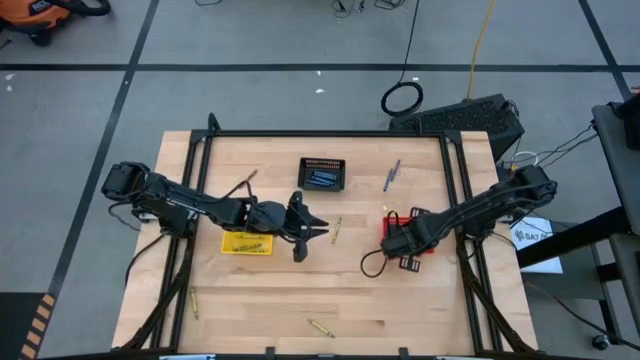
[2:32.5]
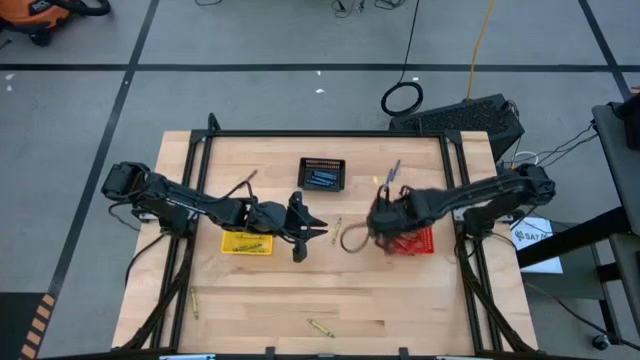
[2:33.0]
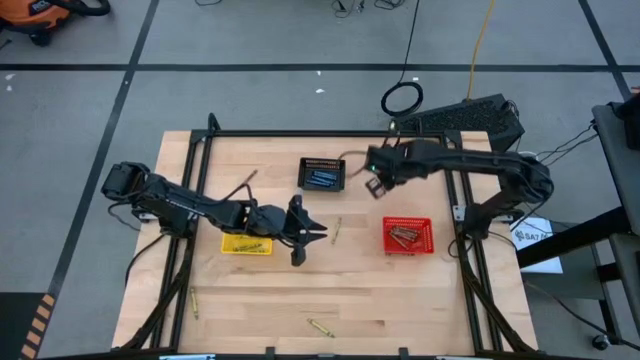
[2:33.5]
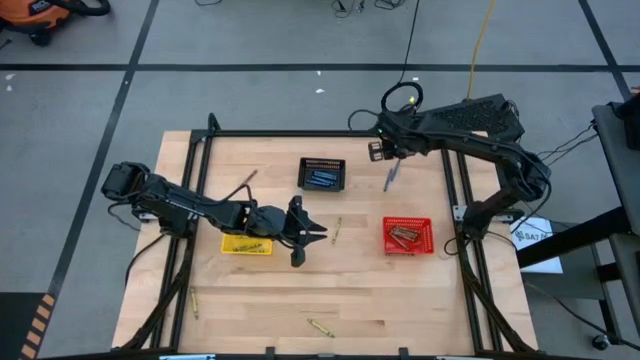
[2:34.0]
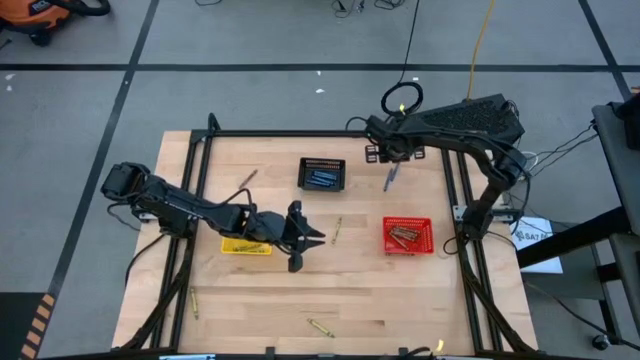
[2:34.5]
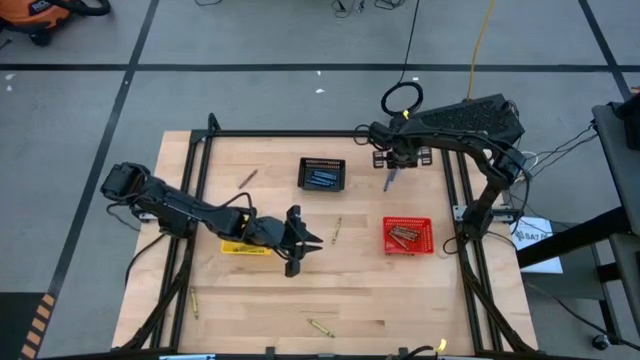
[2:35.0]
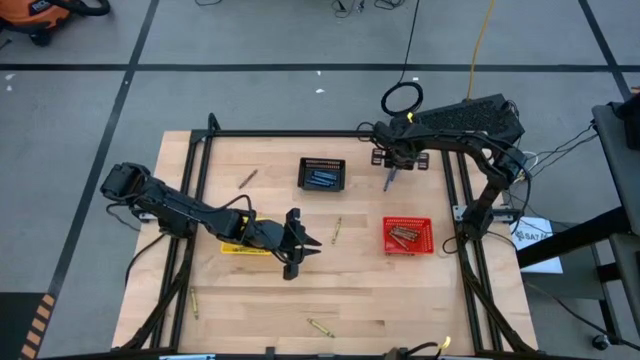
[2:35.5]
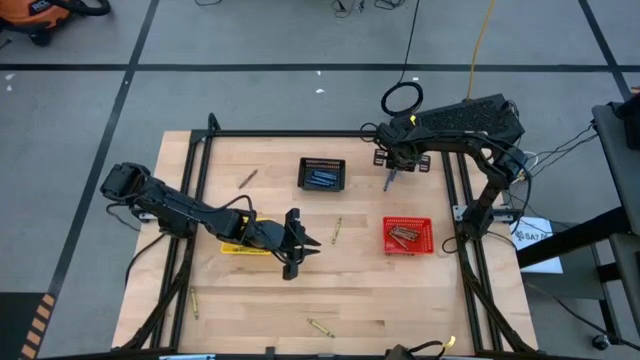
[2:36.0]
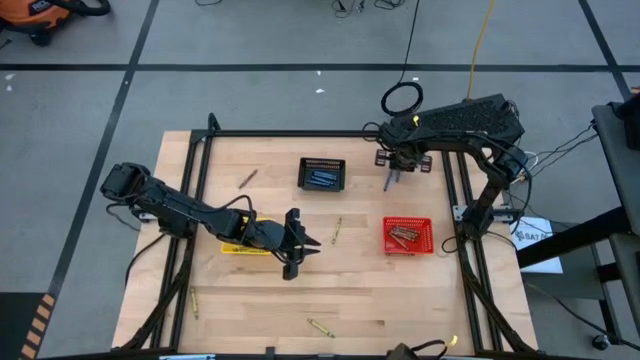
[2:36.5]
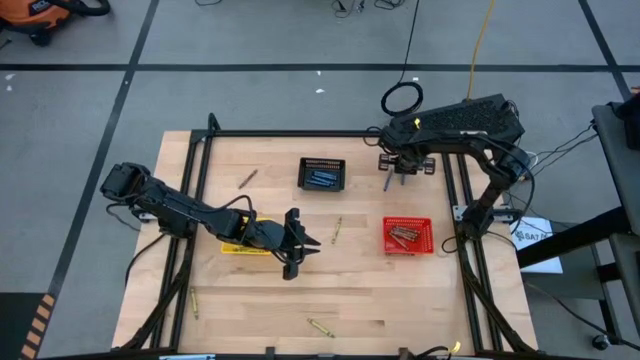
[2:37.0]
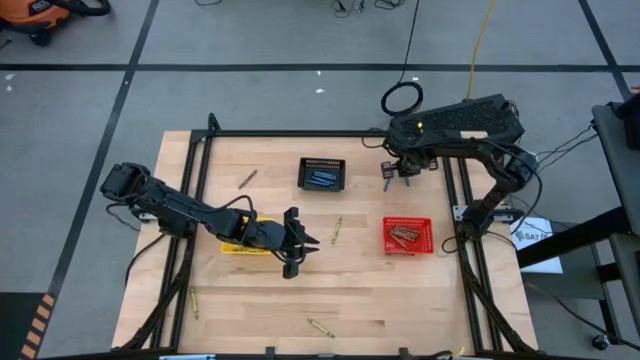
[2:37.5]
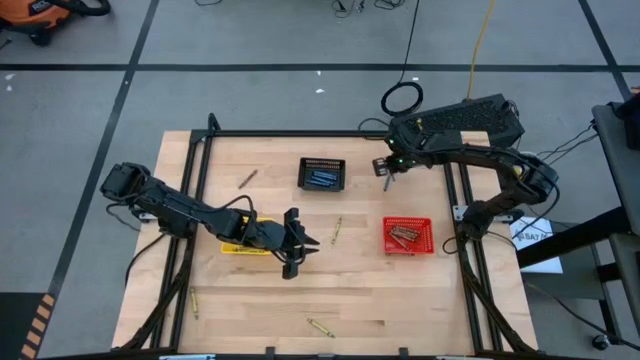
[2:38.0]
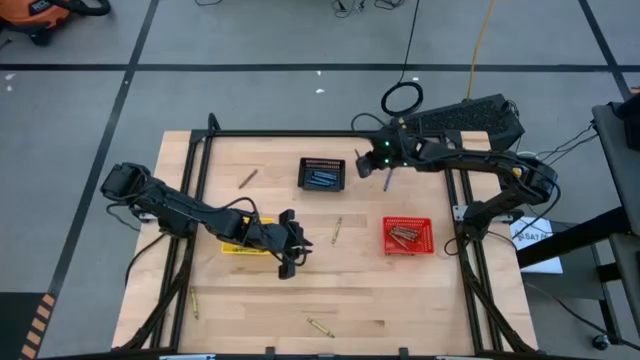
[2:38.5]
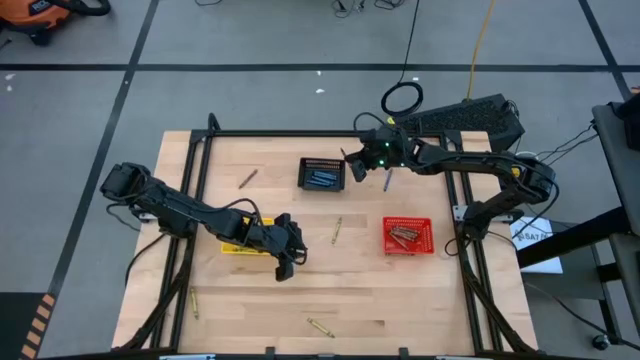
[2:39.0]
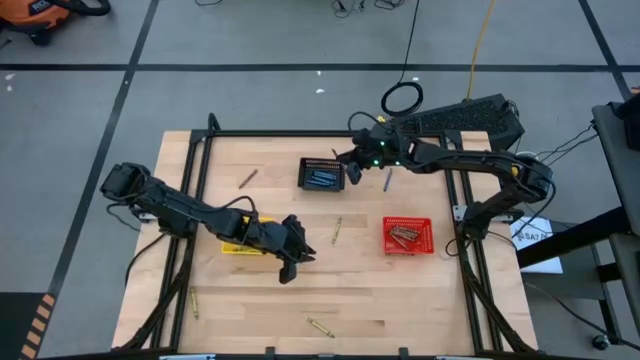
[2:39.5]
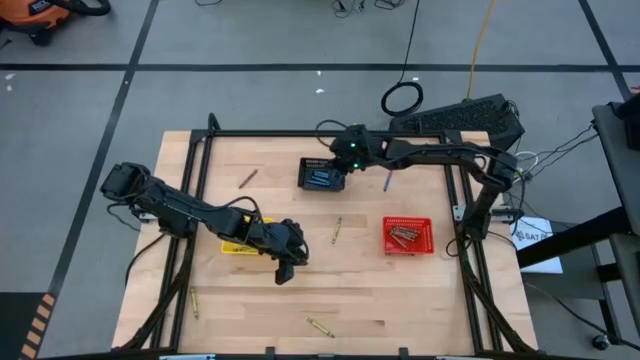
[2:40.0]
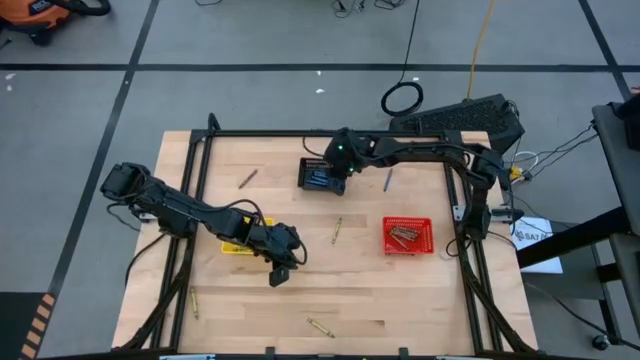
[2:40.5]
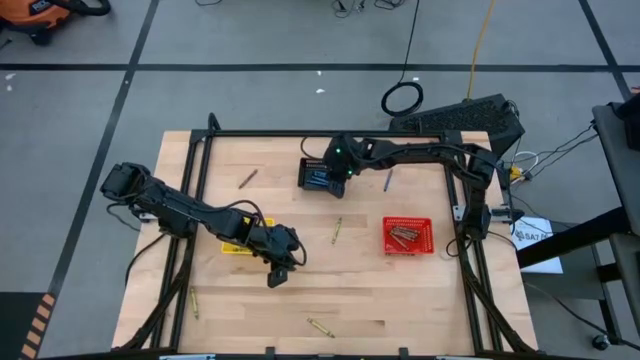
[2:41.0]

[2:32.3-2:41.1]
Task: Sort crayons
Put the blue crayon into the black bin

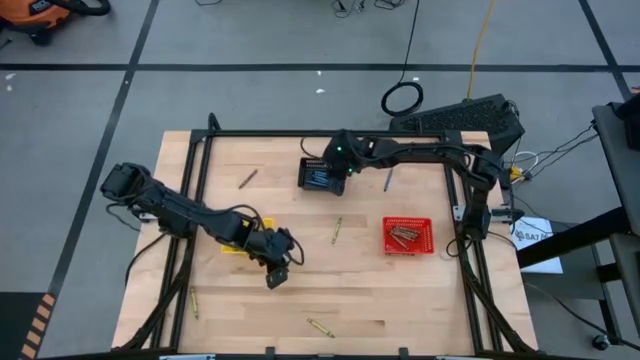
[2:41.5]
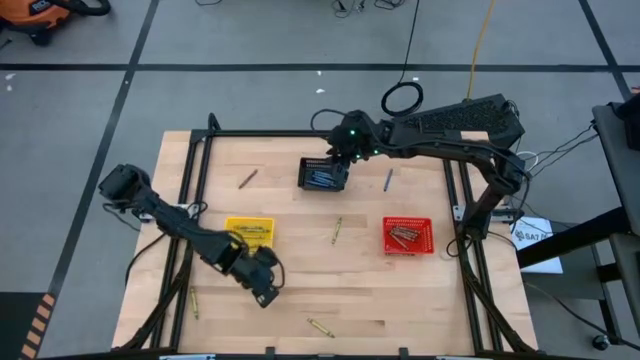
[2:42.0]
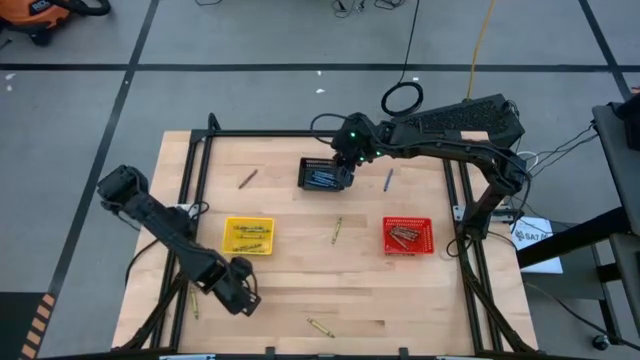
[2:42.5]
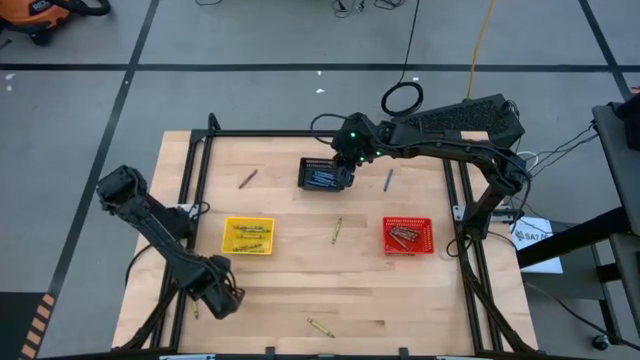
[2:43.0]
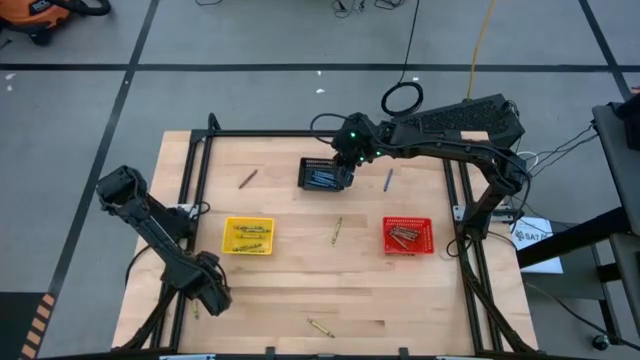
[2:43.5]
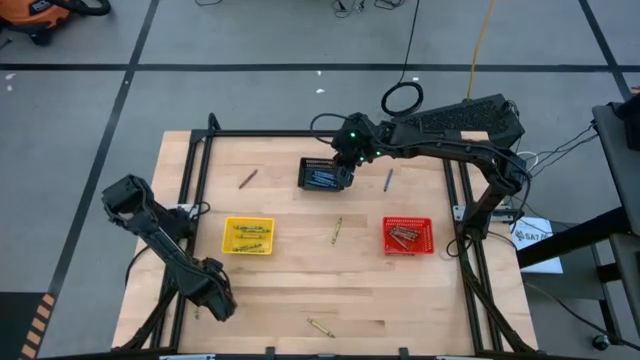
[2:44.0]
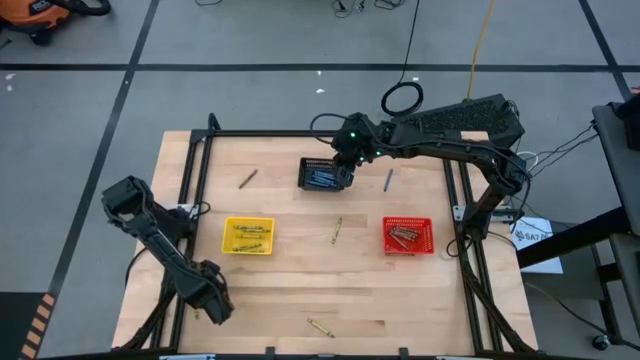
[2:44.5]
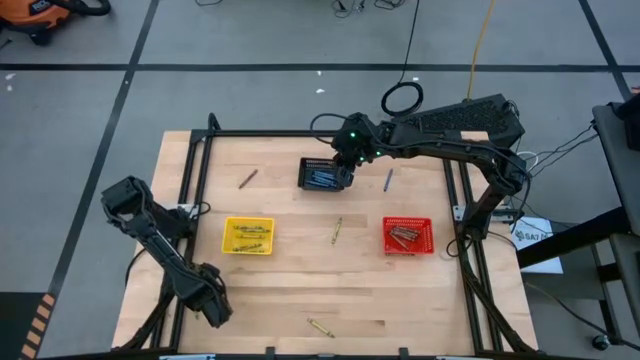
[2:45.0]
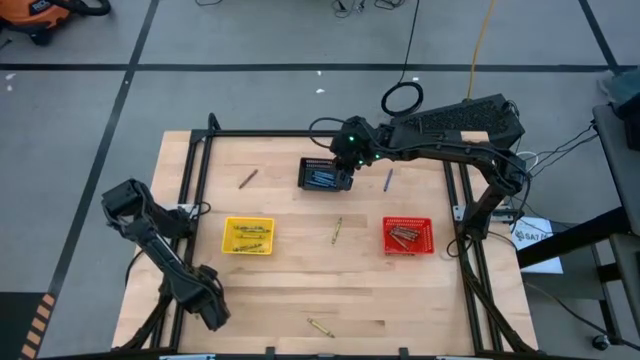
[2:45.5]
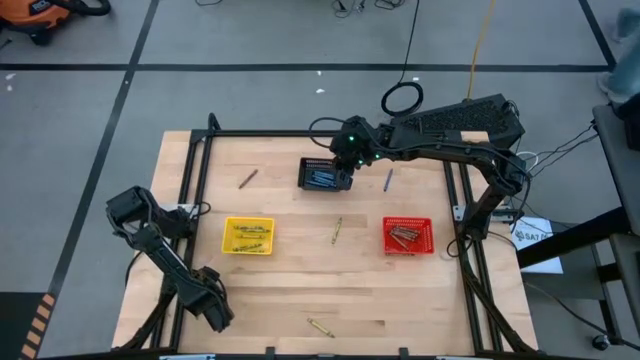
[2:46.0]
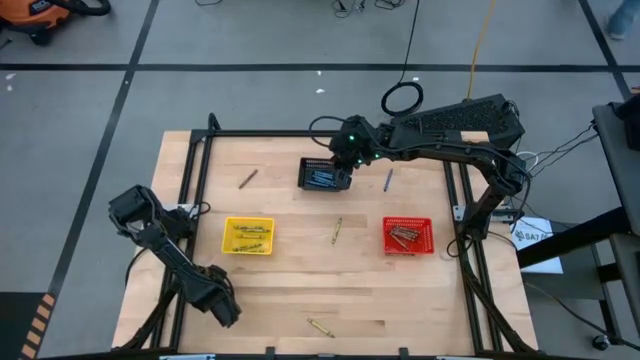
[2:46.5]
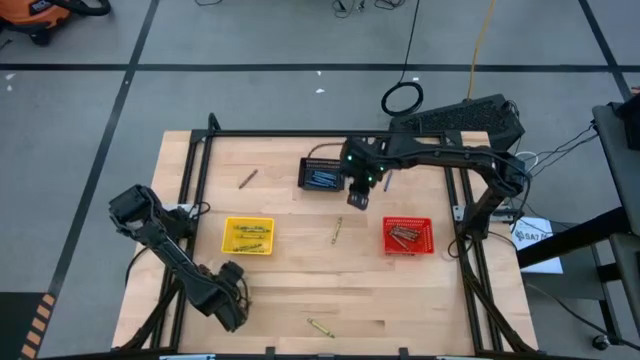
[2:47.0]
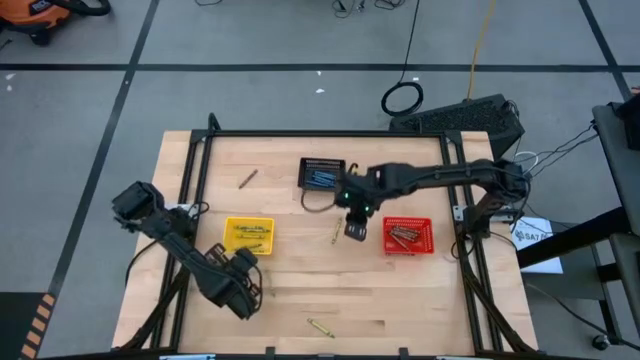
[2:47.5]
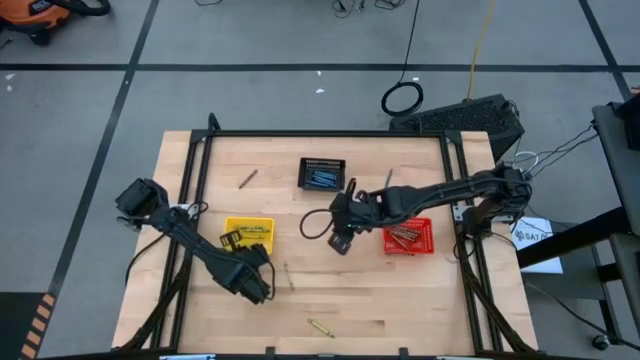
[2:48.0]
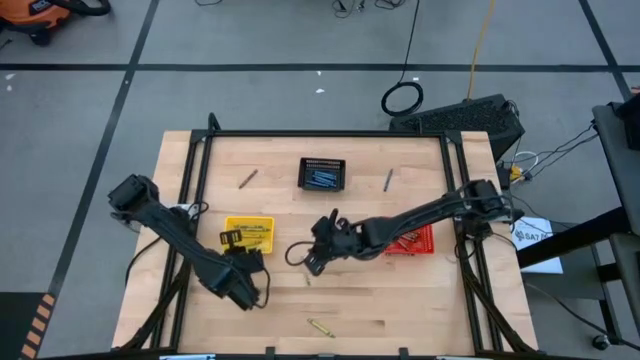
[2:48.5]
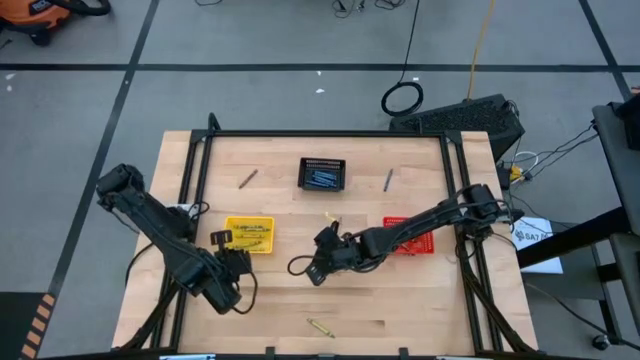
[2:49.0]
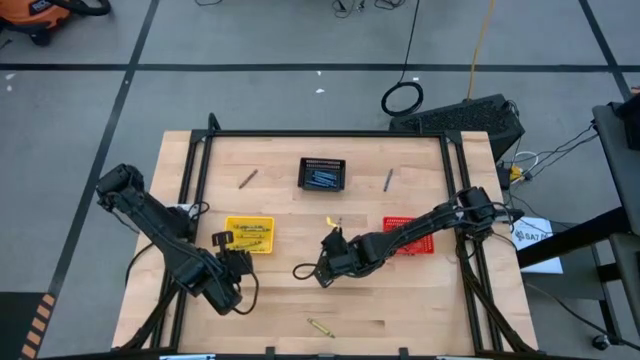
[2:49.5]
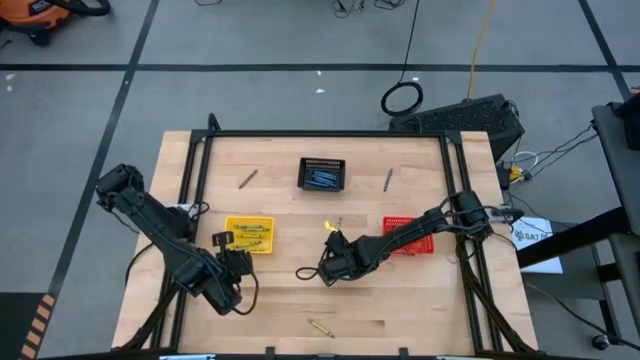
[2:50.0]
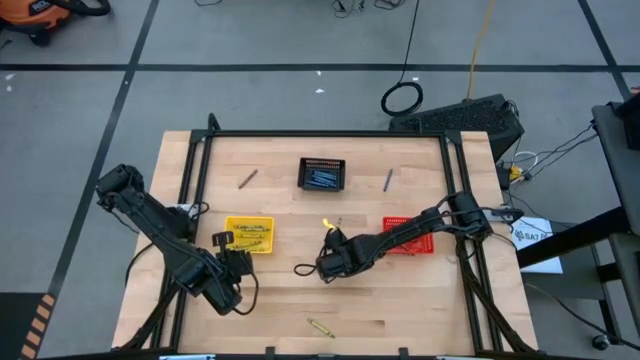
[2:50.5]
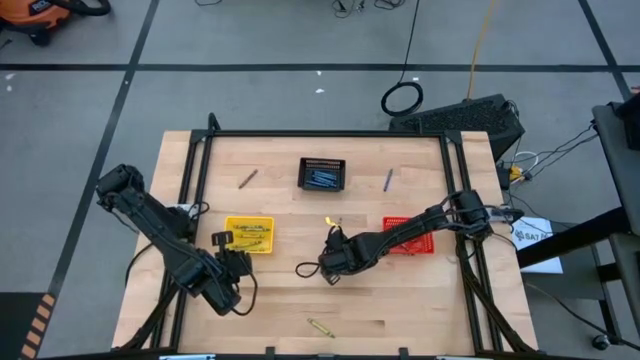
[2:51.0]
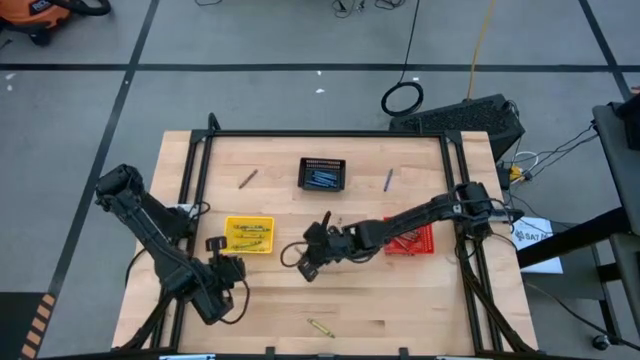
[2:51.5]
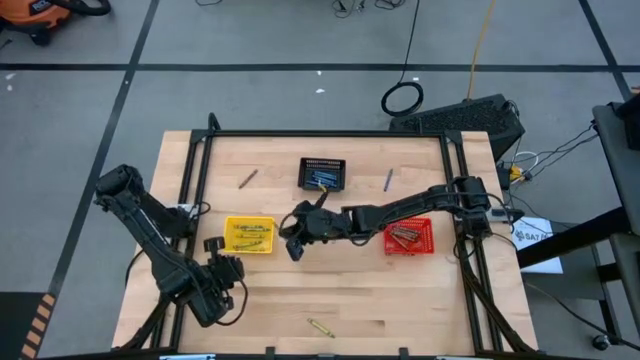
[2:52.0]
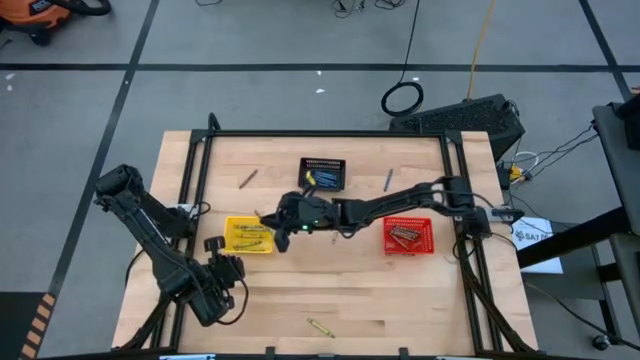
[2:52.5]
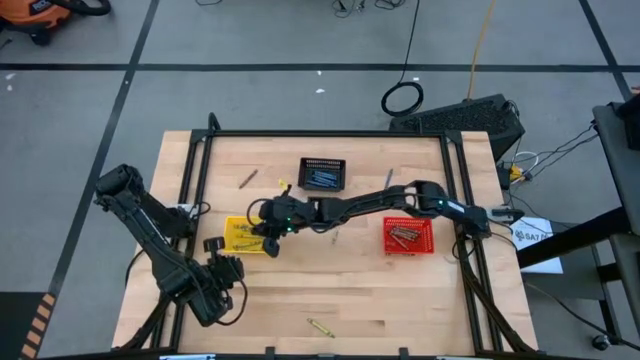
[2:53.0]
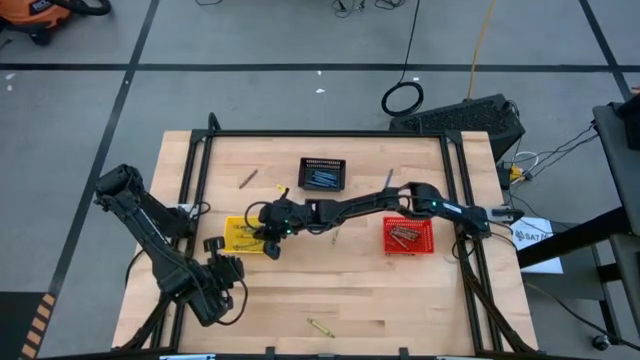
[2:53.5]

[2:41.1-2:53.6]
Put the green crayon into the yellow bin
